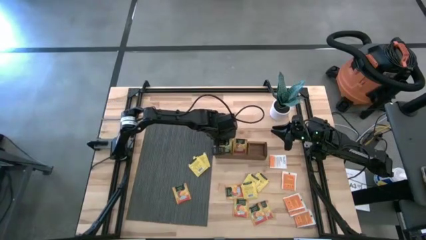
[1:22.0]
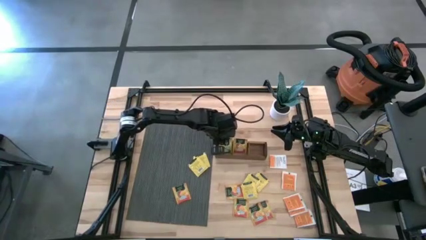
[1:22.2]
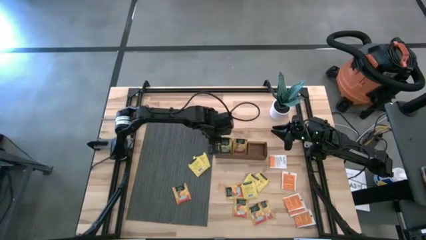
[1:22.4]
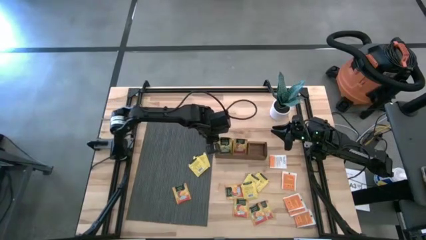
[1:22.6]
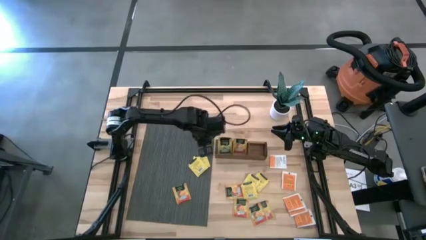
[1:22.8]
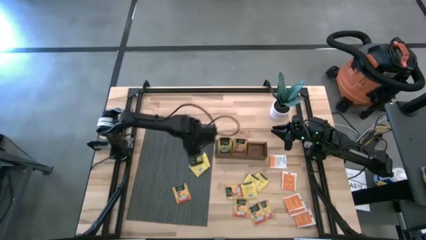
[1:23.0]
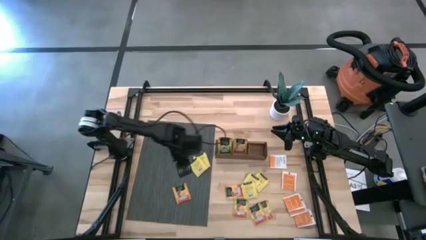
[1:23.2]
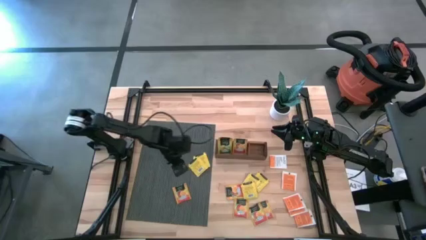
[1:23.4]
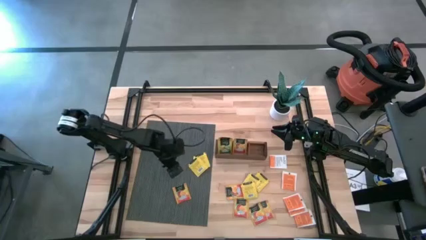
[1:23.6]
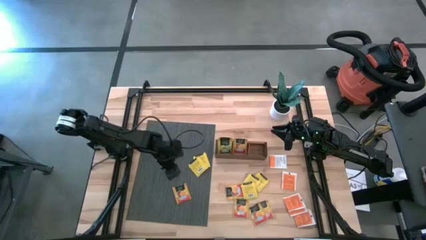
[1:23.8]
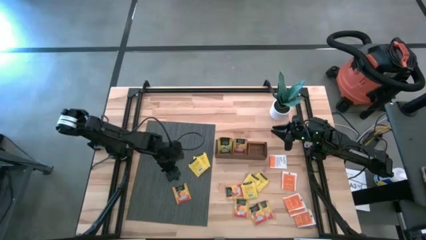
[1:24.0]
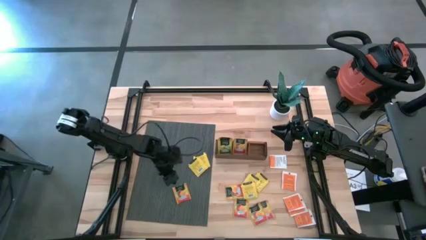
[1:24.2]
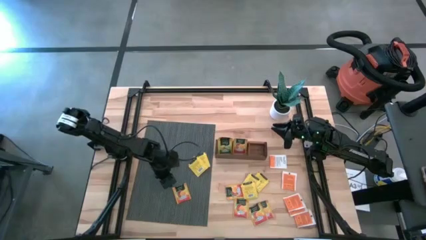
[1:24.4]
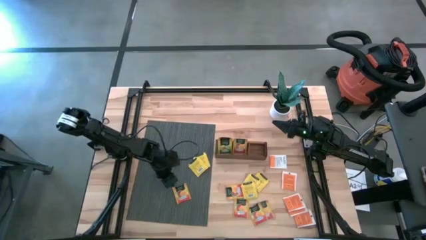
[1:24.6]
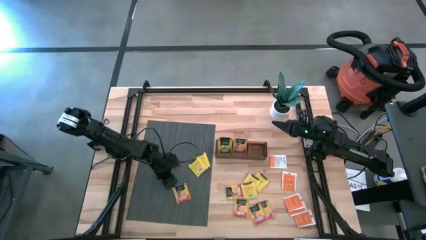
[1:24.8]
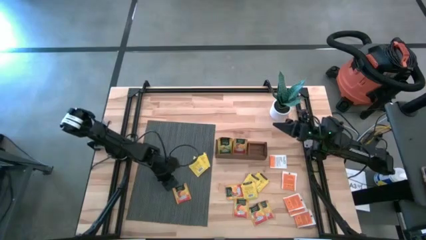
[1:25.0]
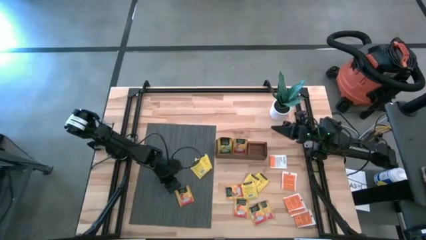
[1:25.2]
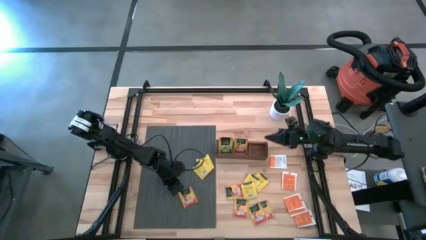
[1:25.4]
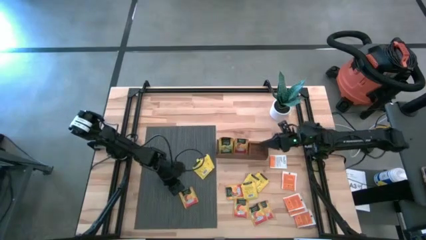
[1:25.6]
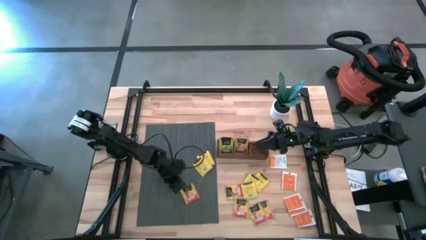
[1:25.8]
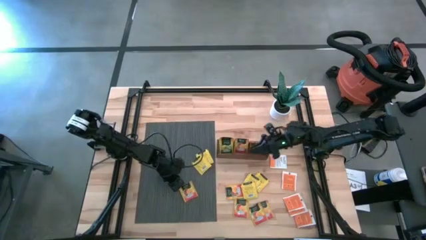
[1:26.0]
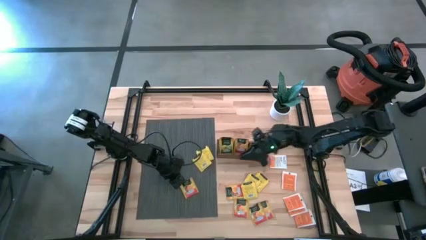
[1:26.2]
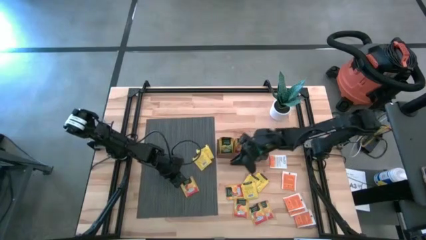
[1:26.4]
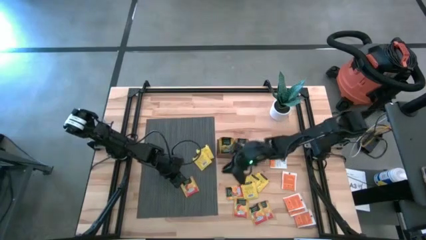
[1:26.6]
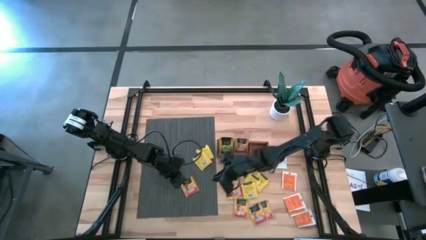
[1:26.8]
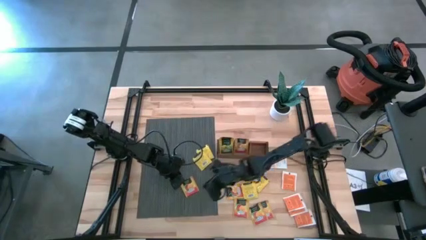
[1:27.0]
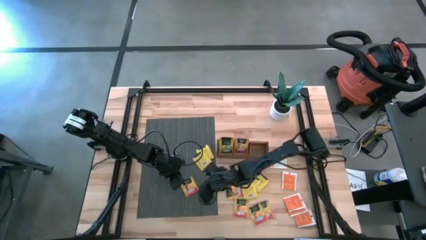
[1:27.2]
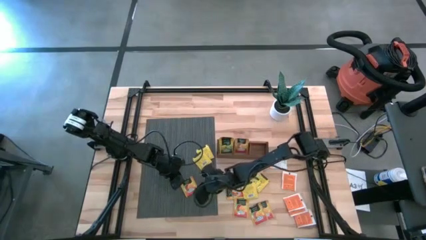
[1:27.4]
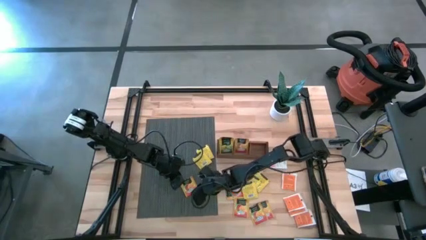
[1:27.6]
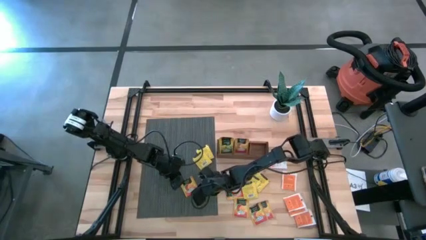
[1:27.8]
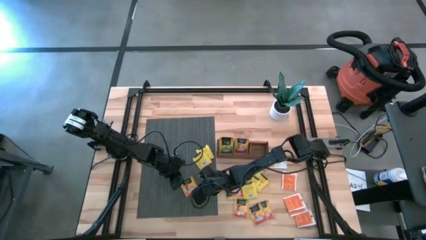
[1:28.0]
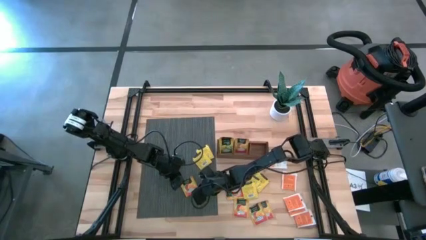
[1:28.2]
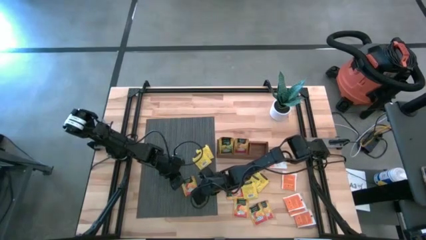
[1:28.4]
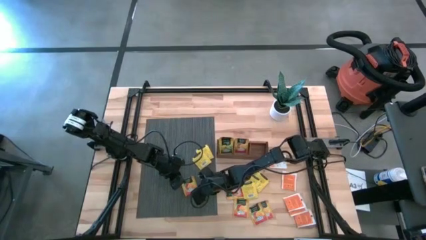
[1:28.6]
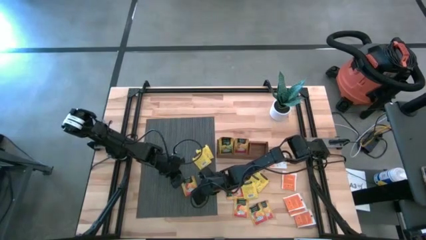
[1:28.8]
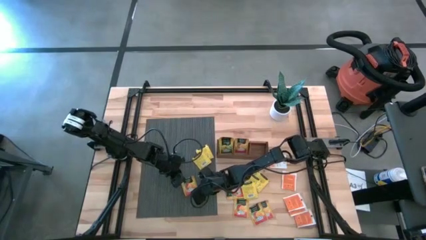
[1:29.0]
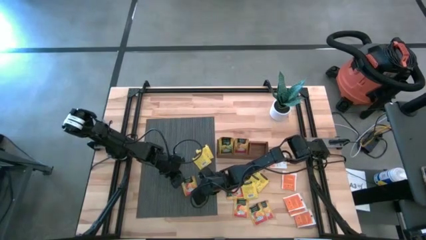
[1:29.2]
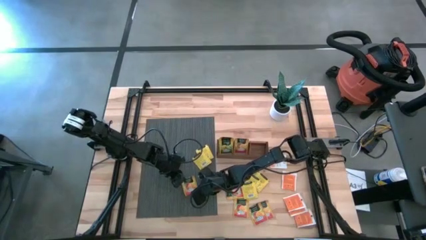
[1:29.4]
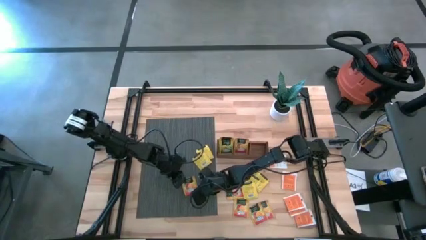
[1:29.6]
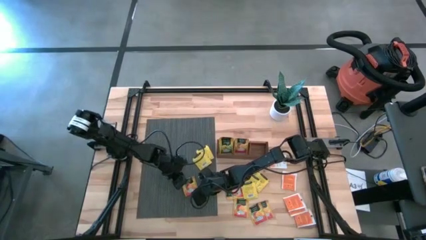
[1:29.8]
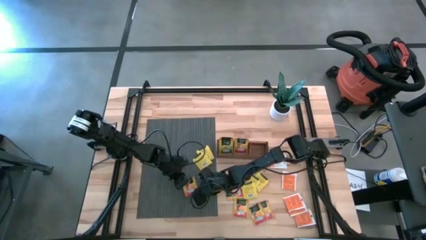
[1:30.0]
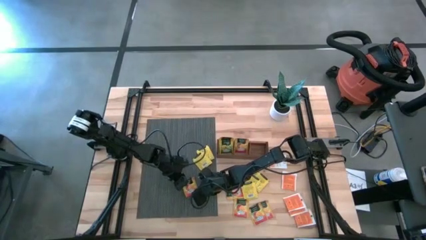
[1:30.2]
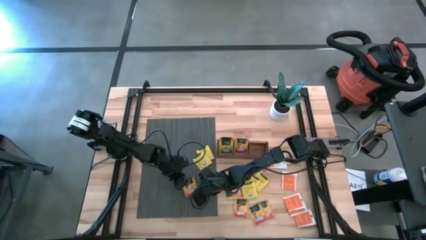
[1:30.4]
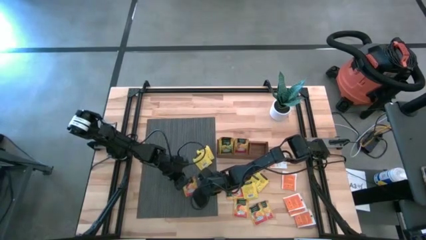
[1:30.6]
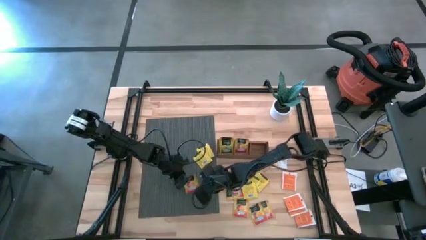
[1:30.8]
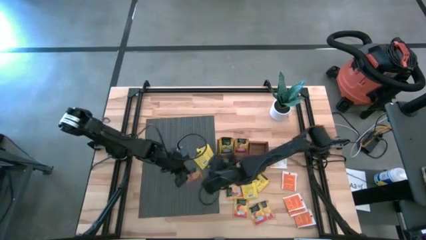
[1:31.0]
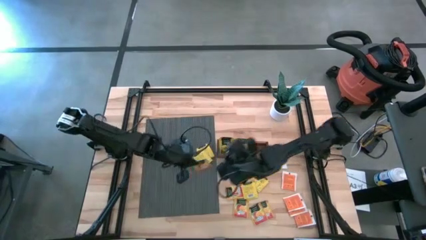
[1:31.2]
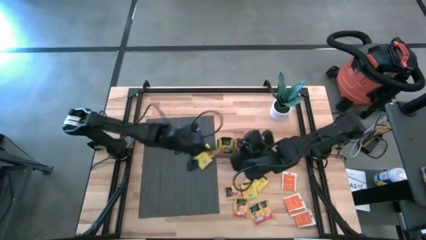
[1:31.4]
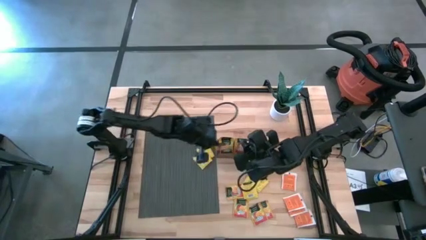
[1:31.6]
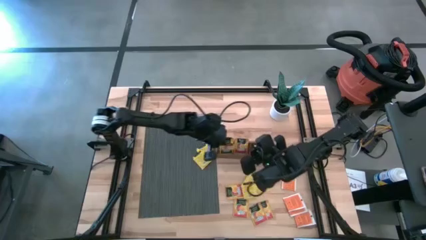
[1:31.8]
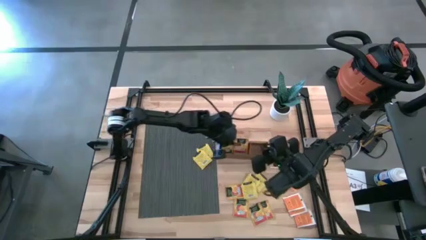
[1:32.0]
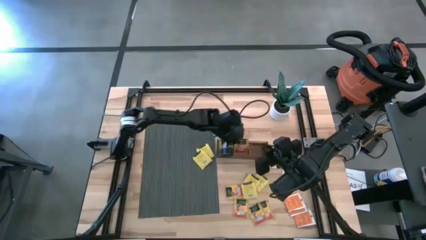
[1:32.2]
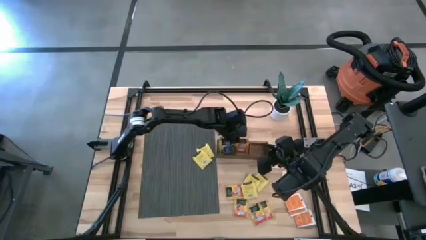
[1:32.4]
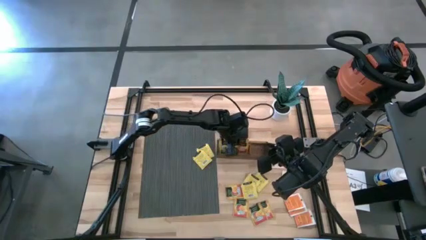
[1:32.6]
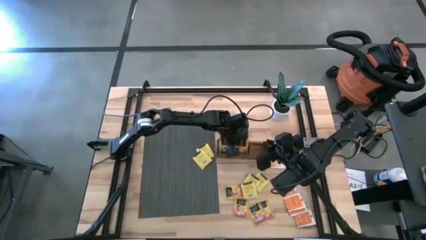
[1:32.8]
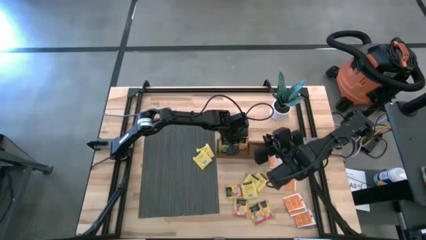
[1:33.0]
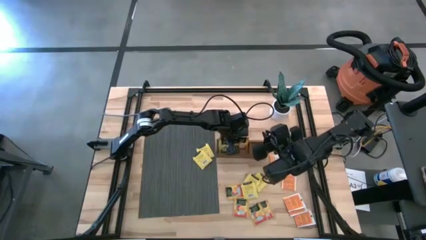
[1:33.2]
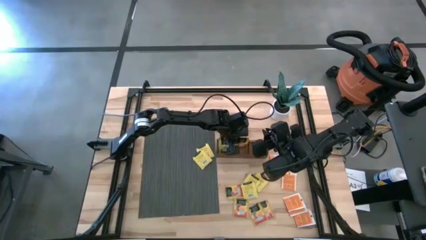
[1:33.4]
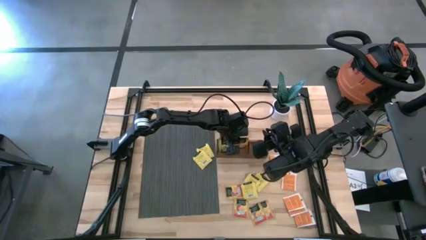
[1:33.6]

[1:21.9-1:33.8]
Task: Pick & Place Tea
Put the orange tea bag into the left section of the wooden organizer

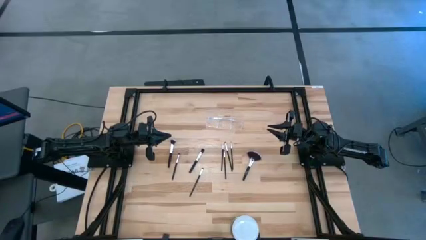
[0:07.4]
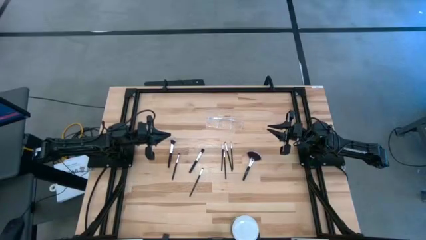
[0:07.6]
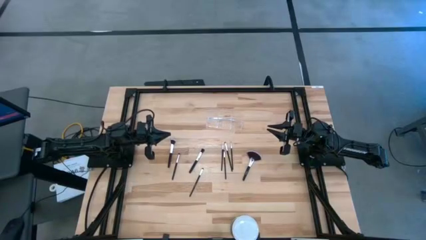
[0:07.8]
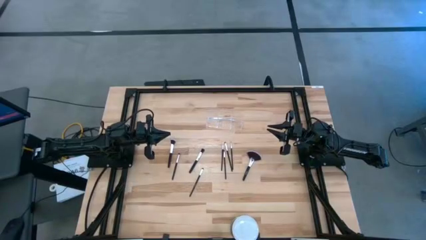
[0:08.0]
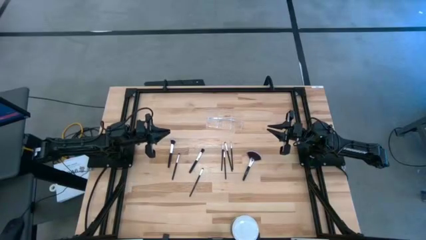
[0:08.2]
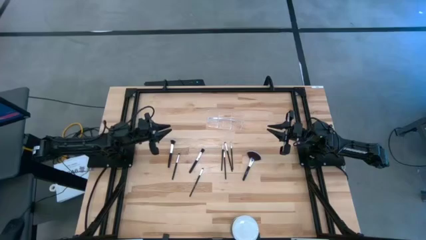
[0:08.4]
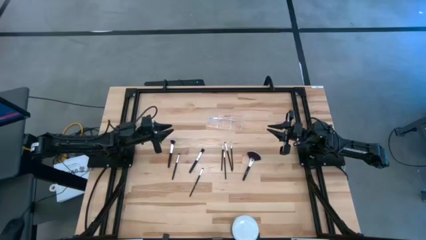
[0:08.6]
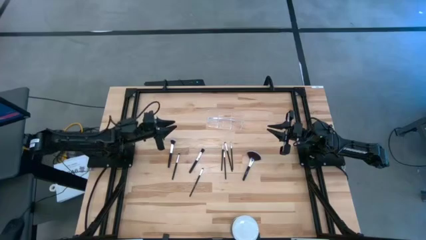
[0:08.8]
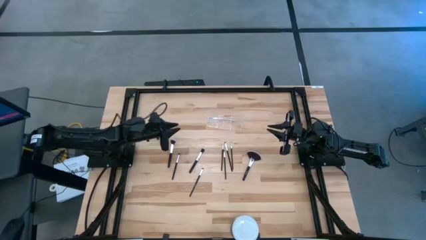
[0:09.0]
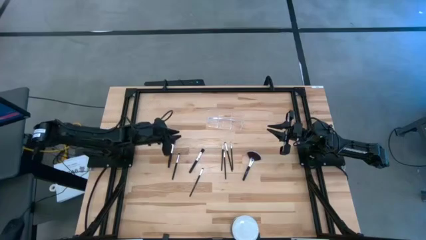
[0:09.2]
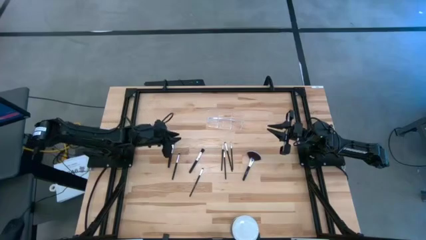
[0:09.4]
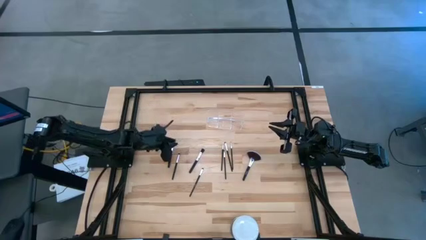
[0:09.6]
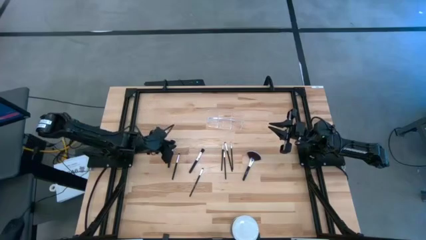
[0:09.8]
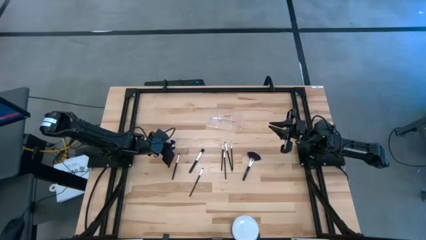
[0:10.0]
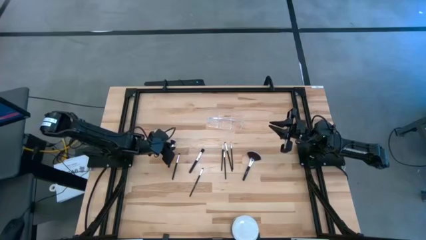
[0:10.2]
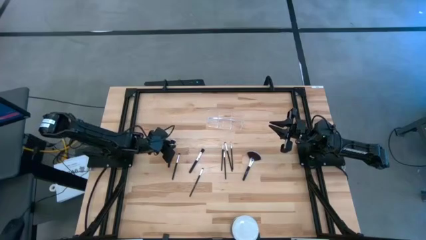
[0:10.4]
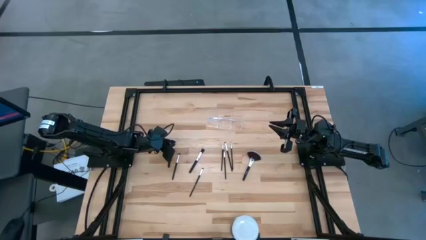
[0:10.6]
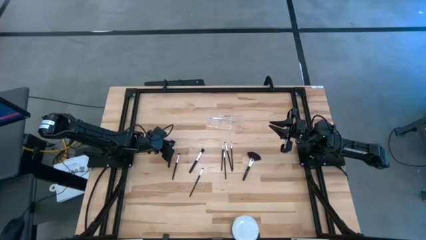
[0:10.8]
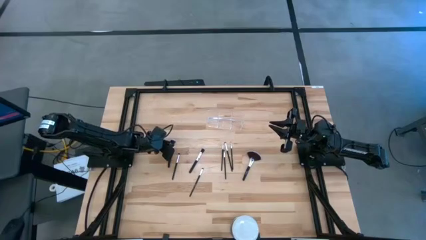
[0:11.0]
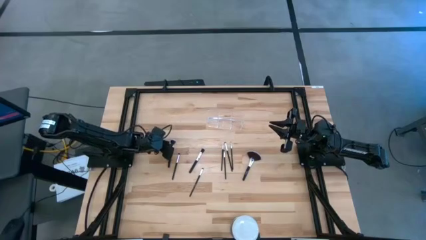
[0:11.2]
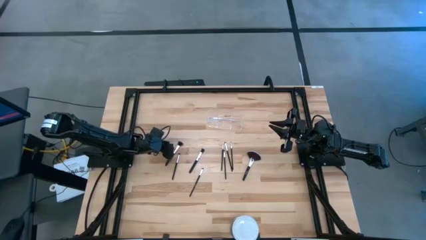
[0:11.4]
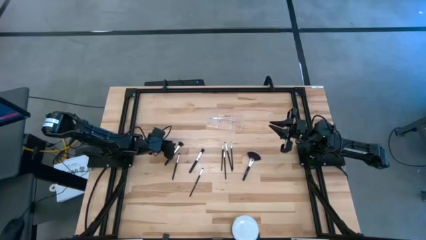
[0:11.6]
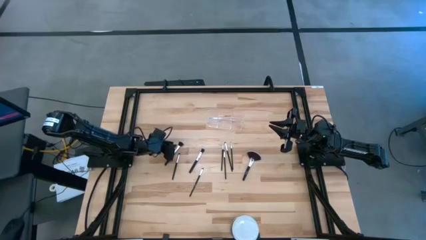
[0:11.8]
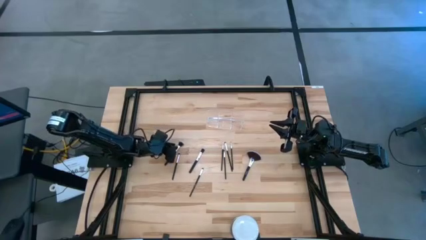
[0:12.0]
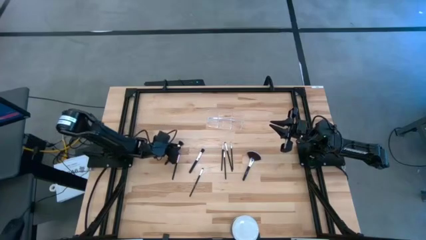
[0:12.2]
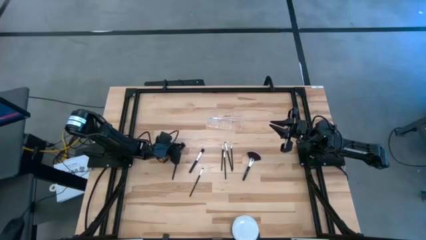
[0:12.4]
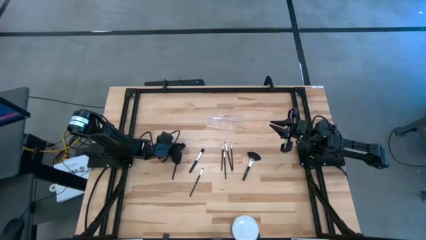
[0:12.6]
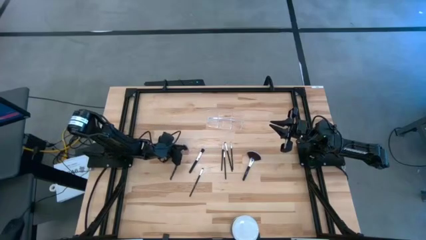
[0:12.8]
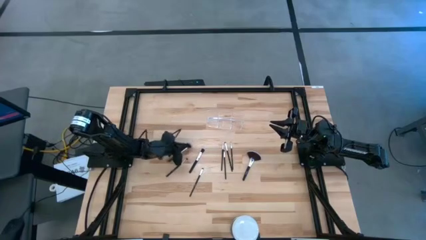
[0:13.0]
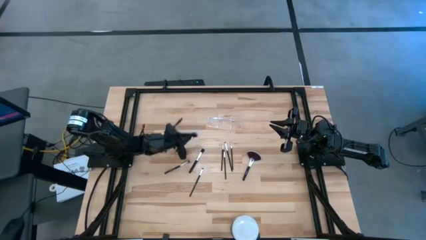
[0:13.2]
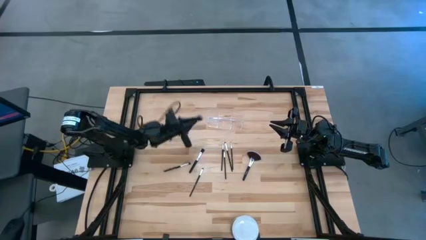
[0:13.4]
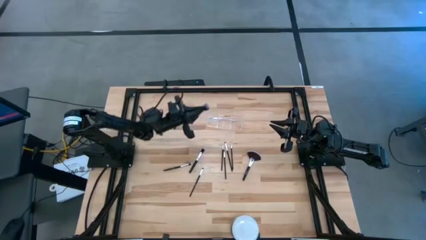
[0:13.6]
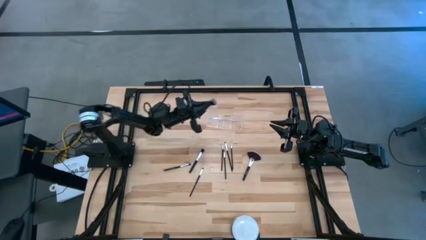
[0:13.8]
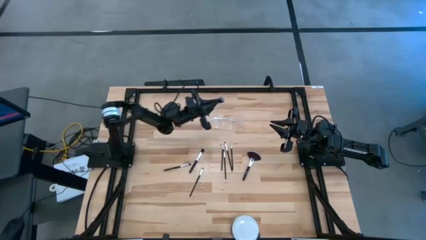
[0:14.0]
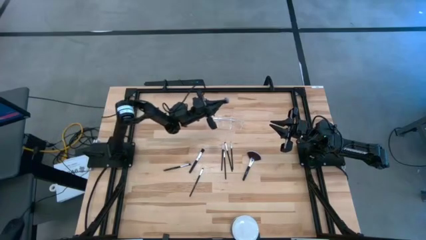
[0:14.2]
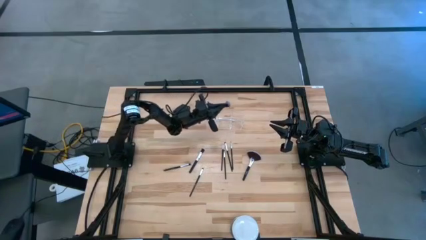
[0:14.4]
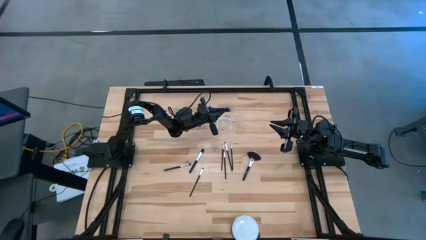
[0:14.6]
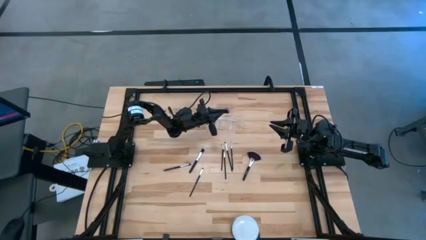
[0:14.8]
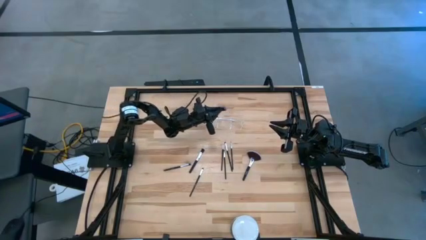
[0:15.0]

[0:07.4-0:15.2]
Task: Put items in baskets/containers
Put the black Powder brush into the transparent organizer
